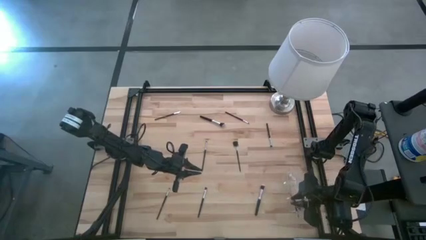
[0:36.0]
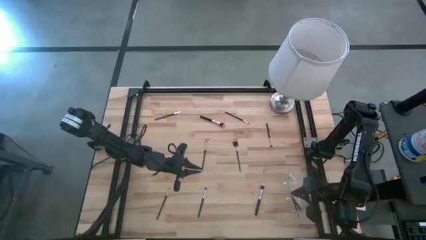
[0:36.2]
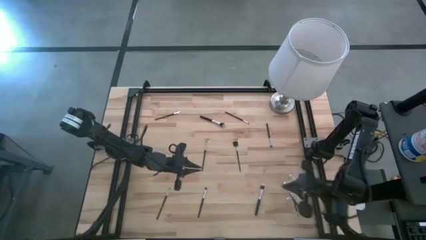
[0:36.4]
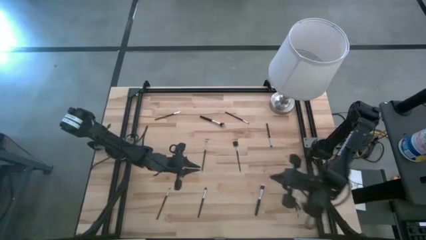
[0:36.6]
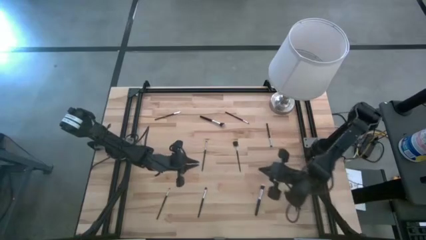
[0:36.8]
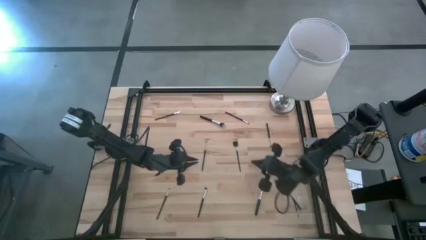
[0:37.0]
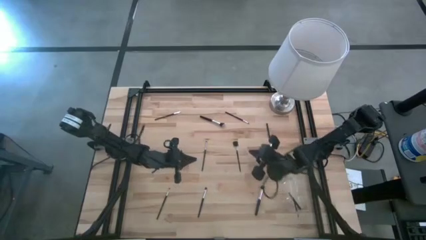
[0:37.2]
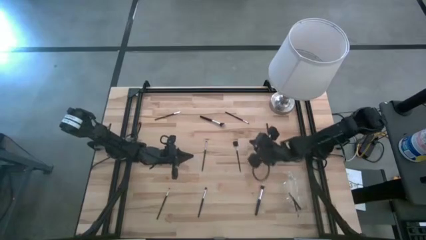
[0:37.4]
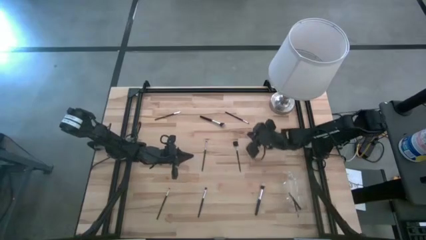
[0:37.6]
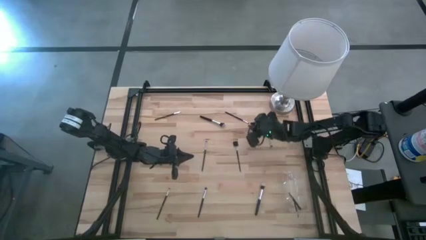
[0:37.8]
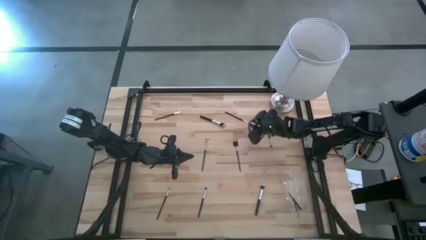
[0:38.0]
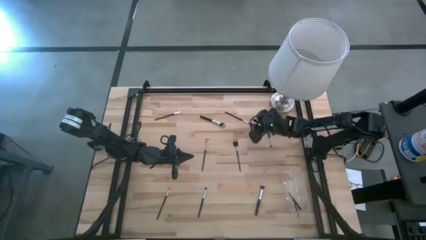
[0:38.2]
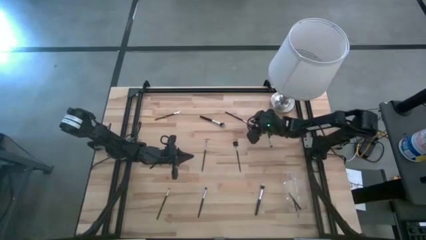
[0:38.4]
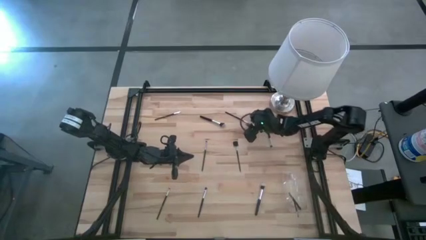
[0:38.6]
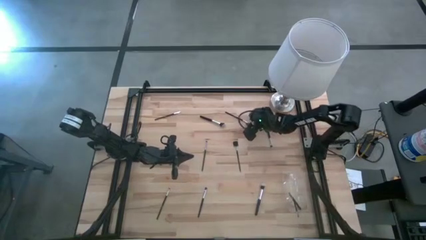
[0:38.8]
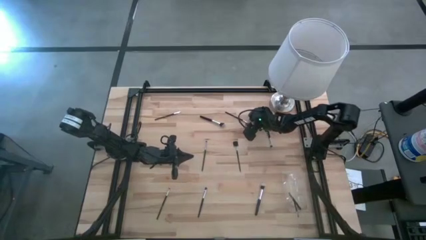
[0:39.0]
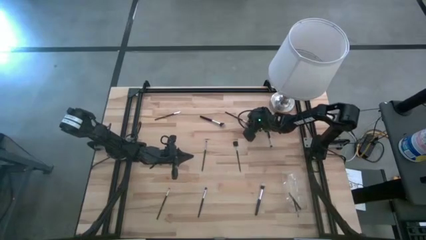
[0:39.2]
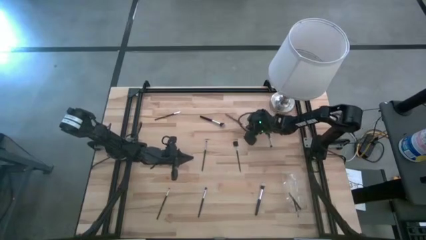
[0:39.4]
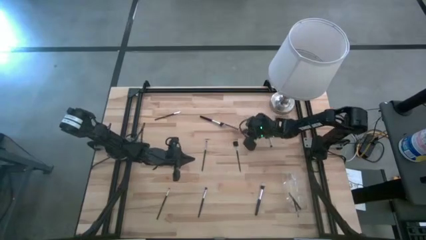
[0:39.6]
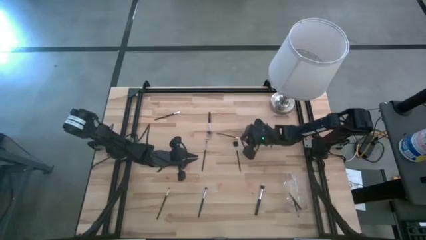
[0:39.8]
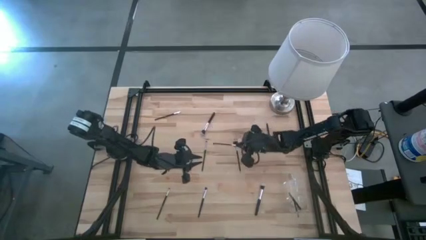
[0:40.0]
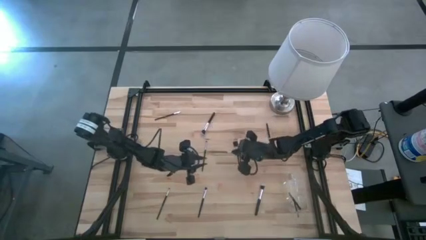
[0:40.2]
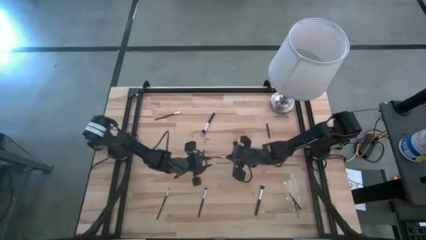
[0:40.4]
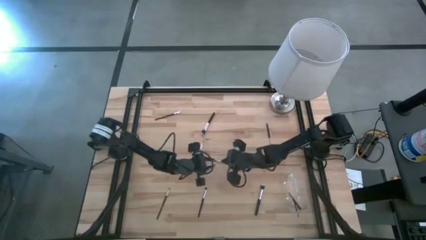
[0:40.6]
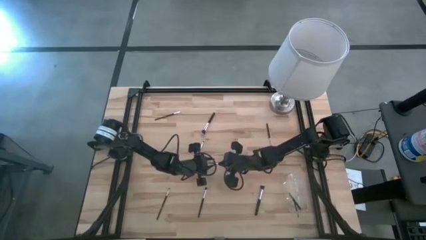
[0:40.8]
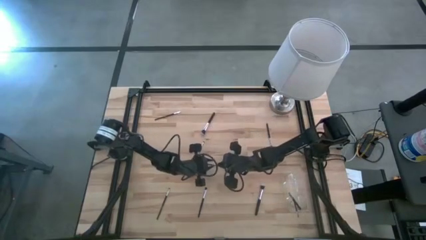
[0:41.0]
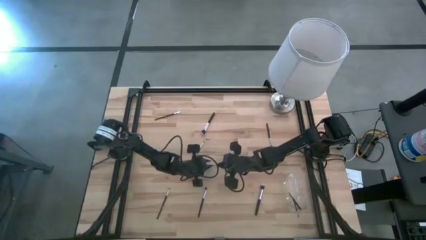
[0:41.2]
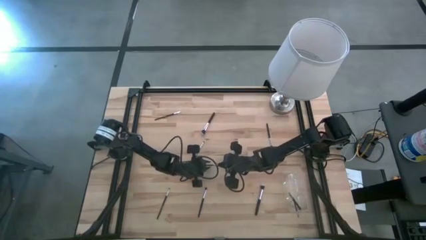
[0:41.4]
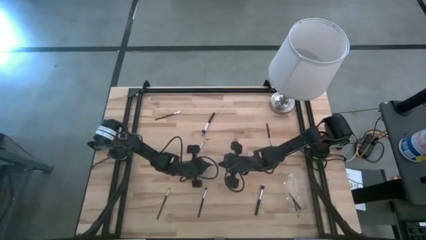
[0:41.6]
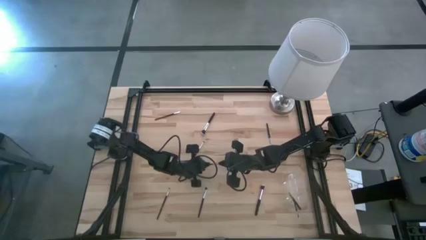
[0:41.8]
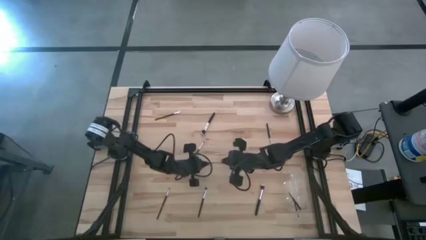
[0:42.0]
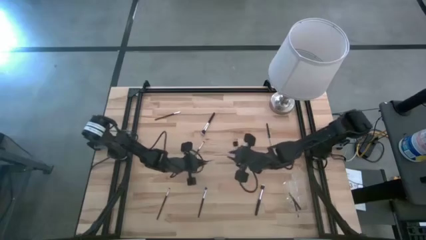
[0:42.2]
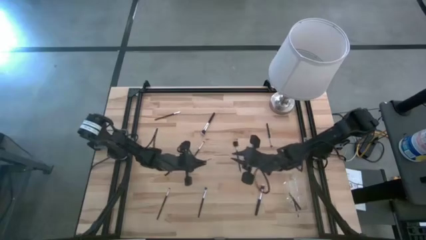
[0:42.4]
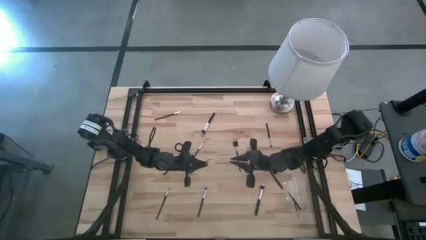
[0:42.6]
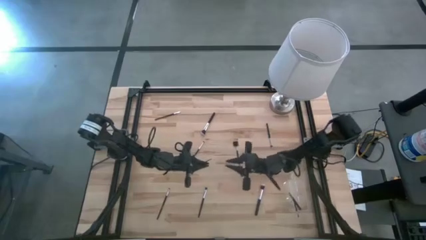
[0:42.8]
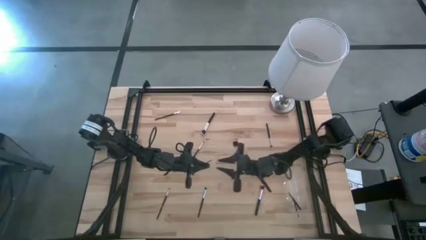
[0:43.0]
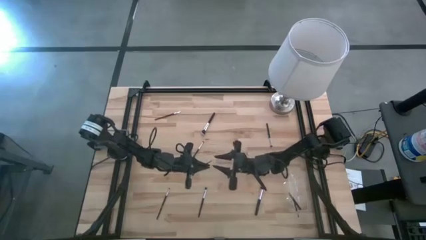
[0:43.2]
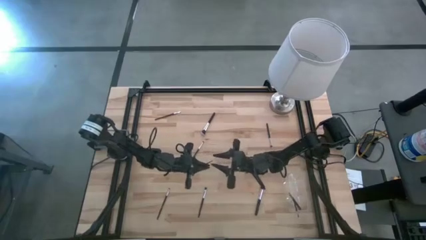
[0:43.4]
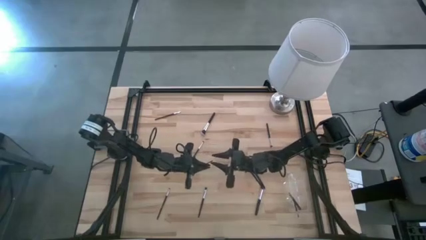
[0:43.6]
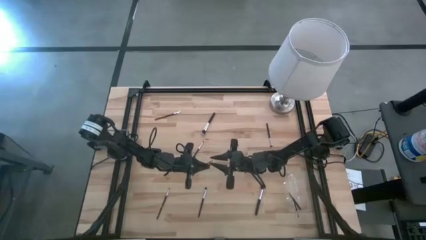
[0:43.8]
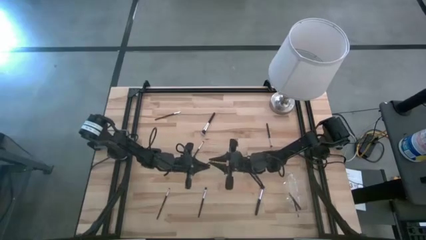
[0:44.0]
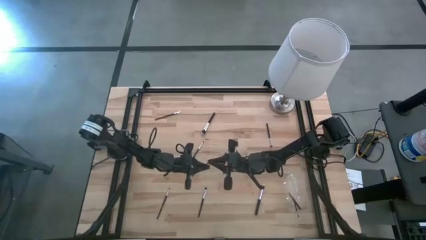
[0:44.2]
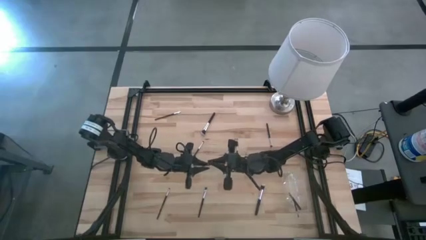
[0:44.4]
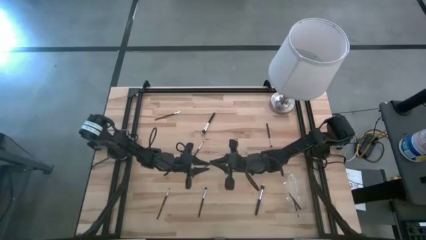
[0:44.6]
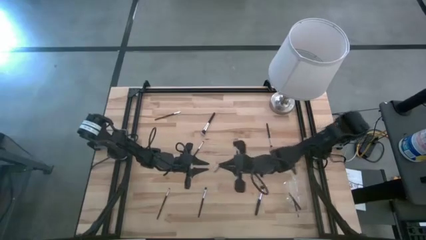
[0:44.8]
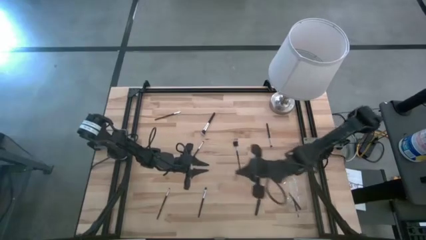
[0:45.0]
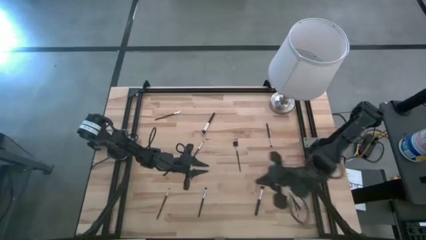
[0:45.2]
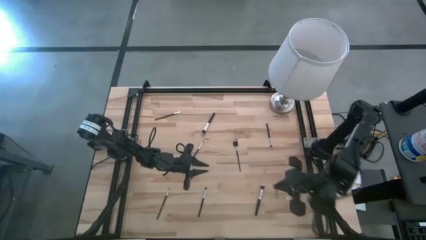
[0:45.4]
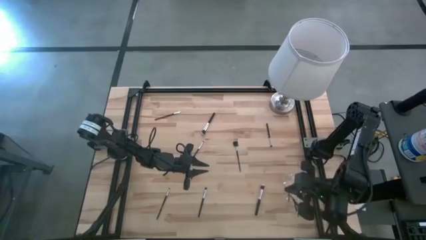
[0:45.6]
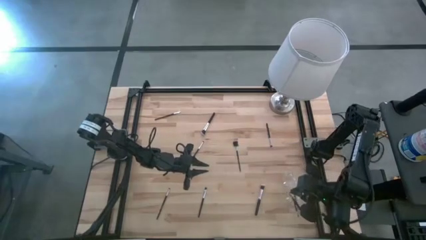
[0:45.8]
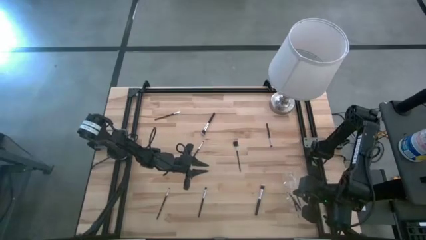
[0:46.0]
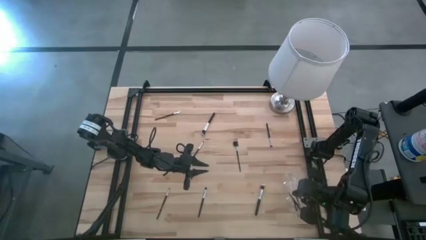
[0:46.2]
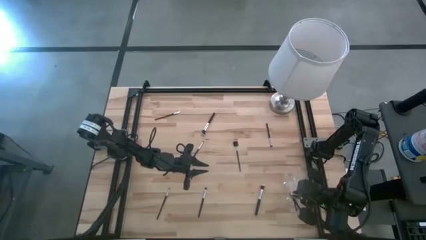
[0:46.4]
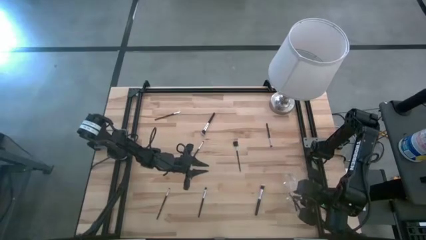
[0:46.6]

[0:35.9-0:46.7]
Task: Put items in baskets/containers
Put the eyeshadow brush into the transparent organizer
